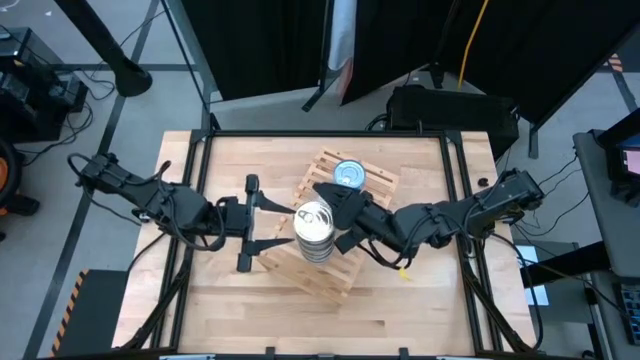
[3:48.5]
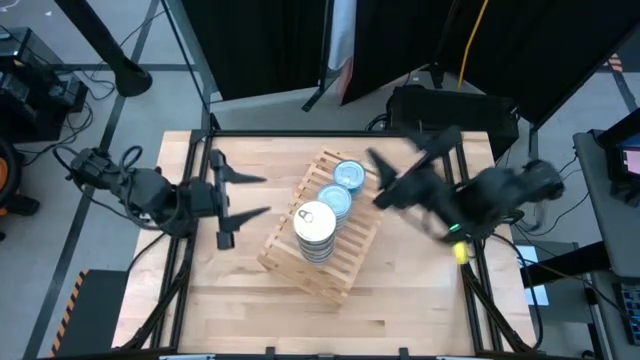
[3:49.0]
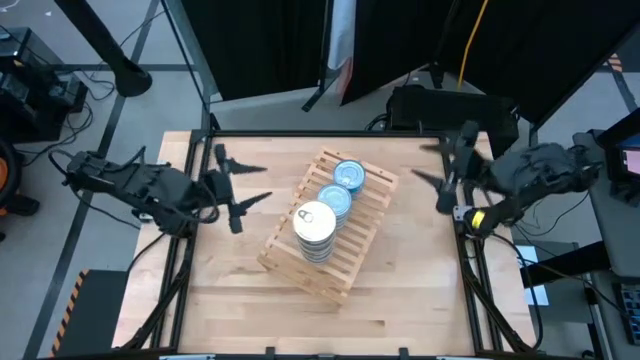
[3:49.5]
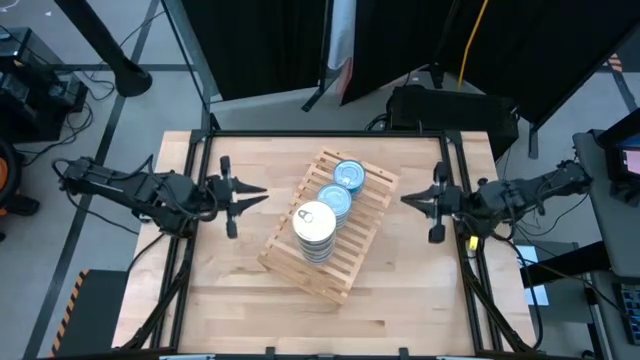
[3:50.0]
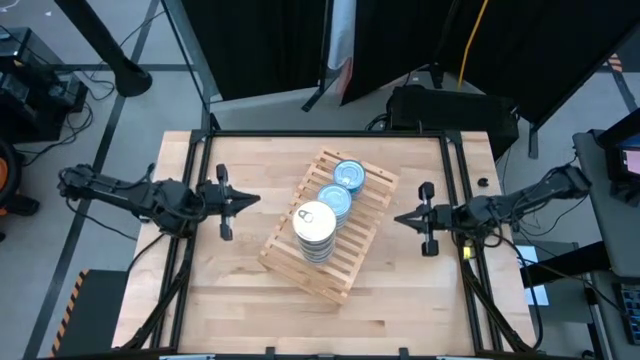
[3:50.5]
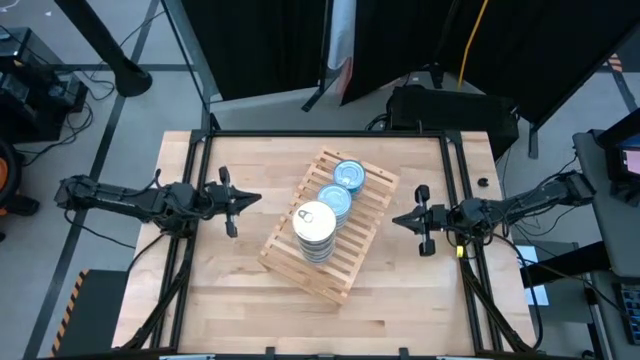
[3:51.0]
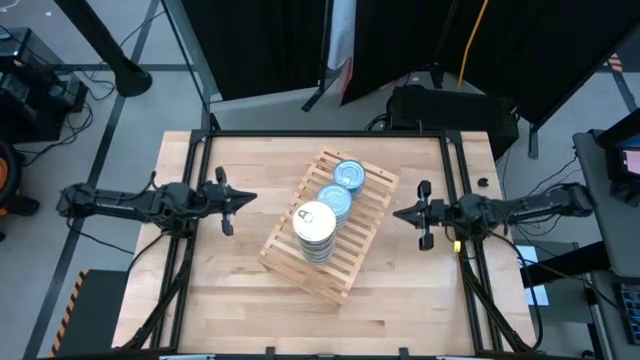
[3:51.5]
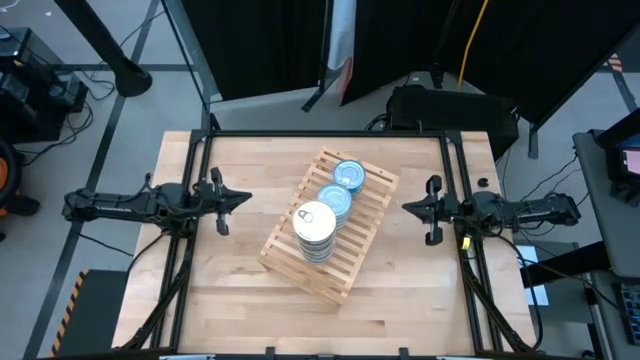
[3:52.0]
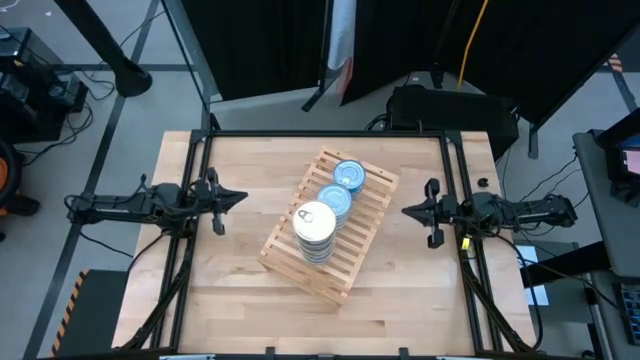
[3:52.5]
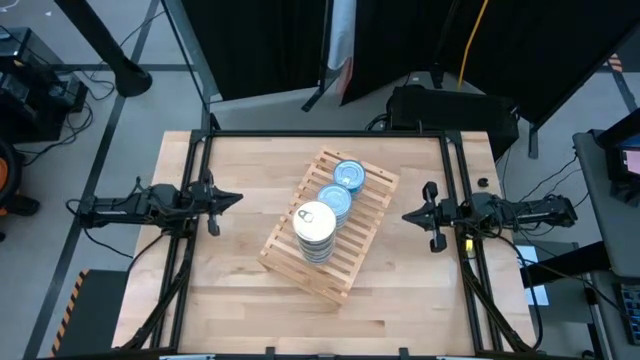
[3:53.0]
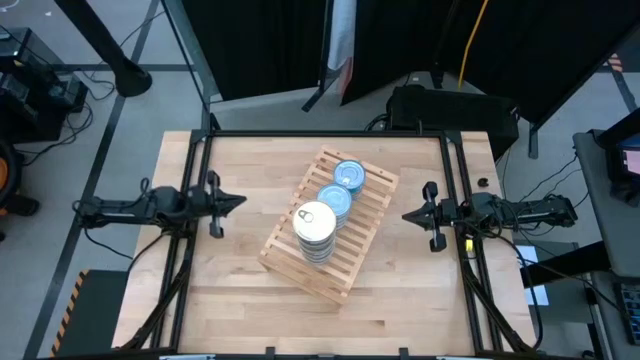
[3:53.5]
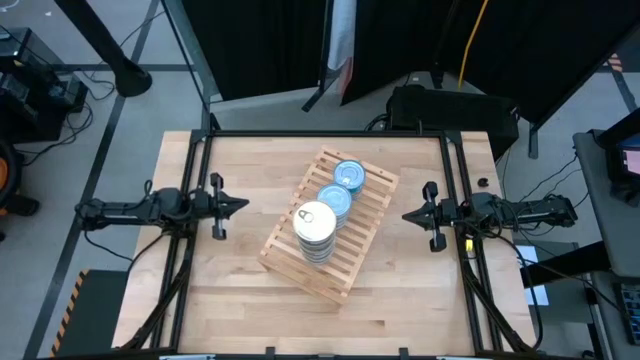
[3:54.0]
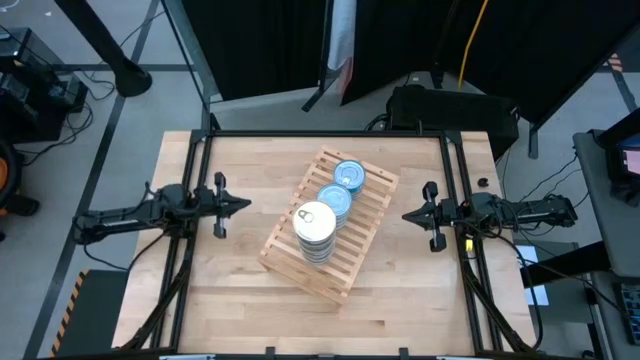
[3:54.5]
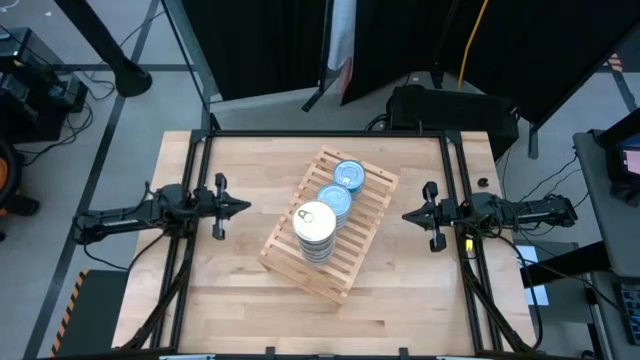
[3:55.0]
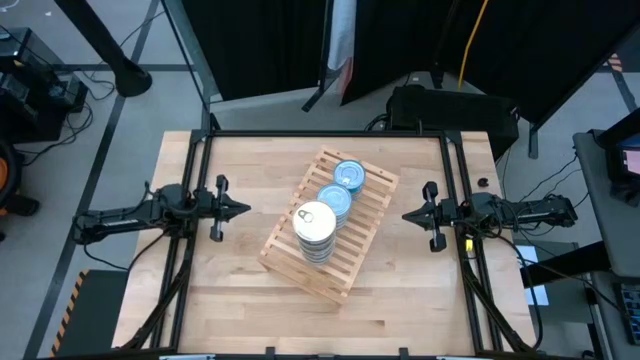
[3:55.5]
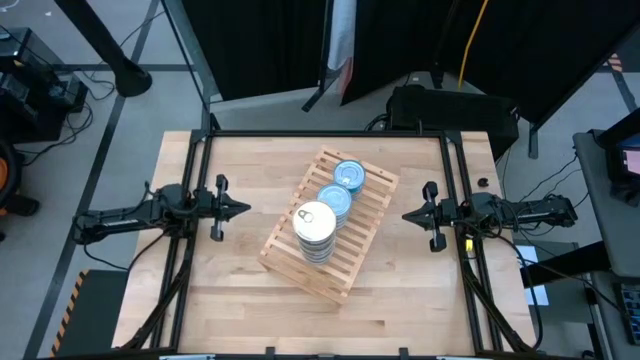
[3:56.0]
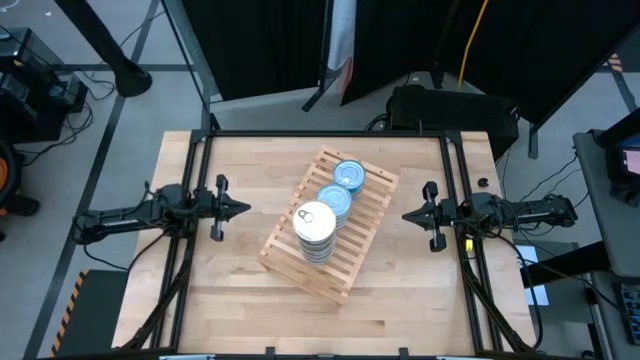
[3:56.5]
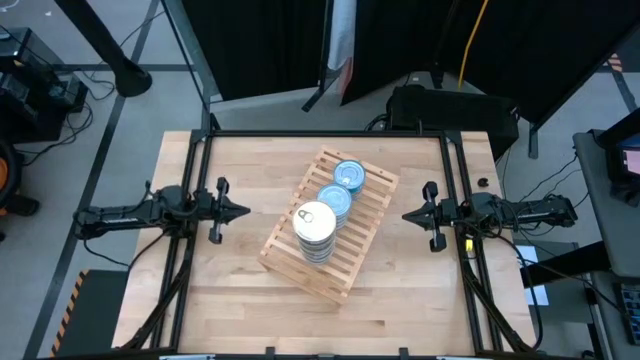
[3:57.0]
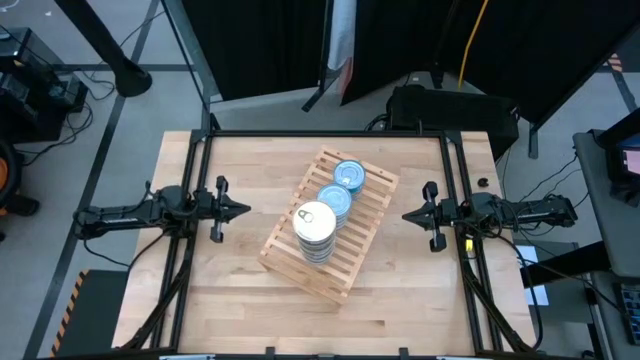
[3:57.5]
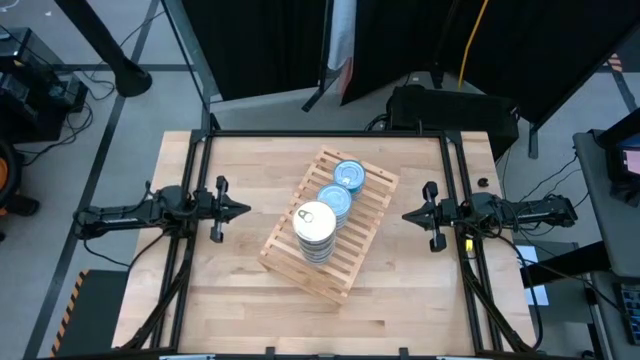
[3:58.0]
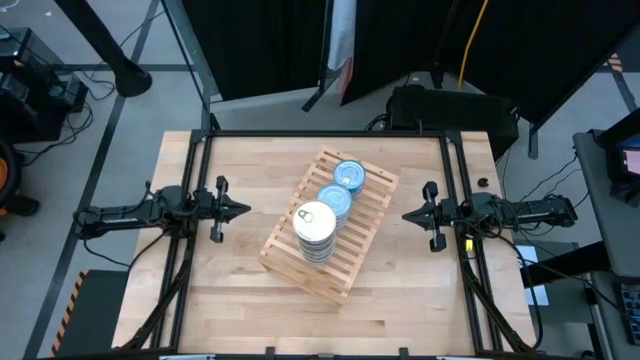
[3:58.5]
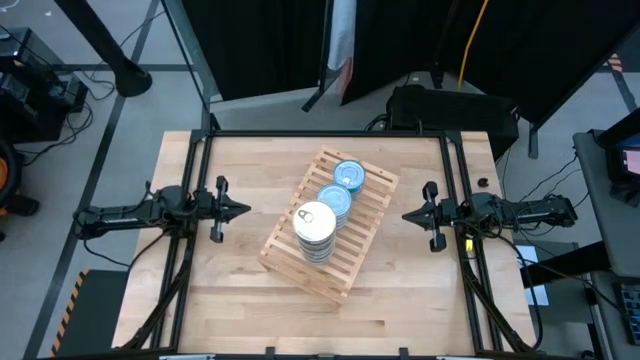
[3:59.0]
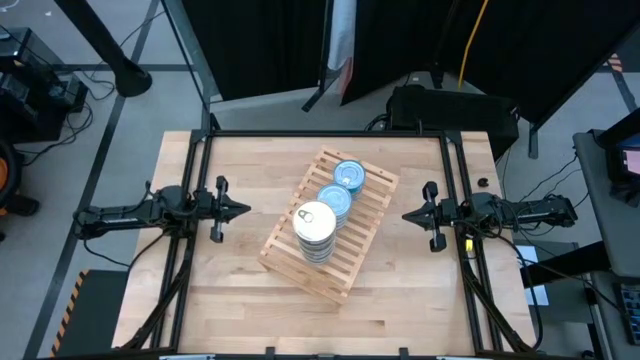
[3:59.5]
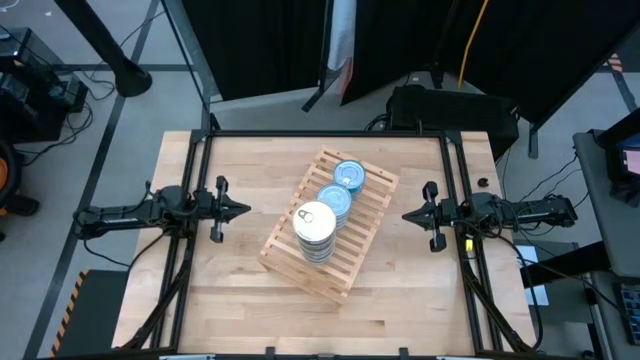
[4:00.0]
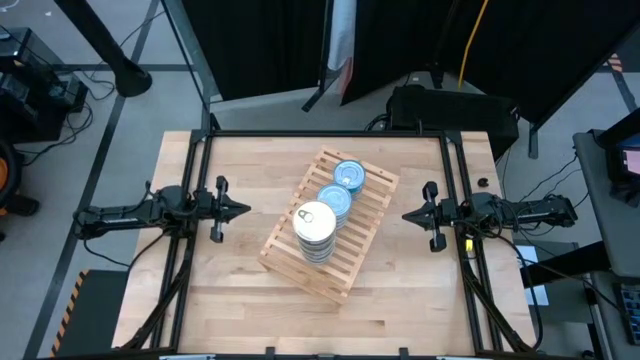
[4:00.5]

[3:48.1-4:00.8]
Task: Stack canned seafood by type on shelf
Return to Home Position

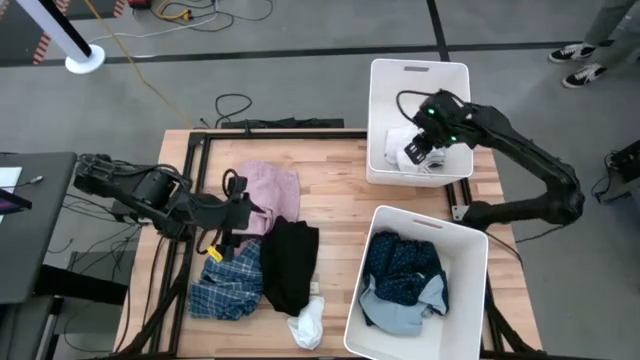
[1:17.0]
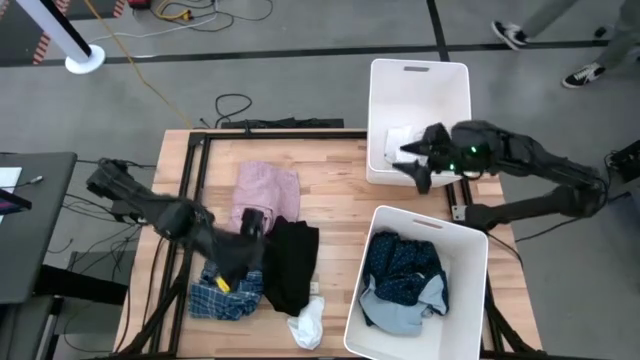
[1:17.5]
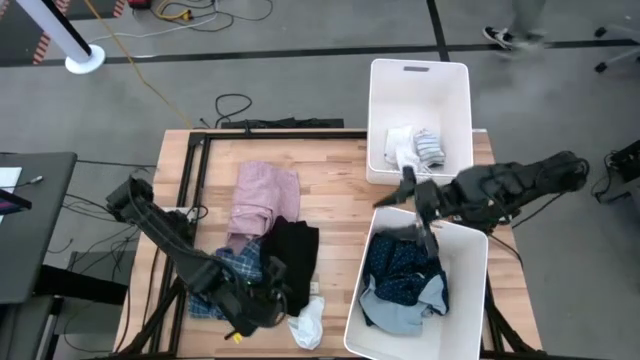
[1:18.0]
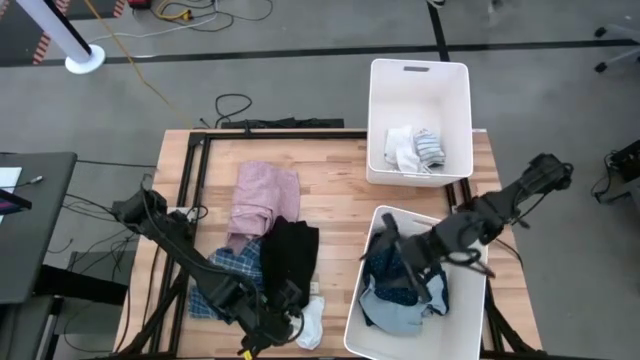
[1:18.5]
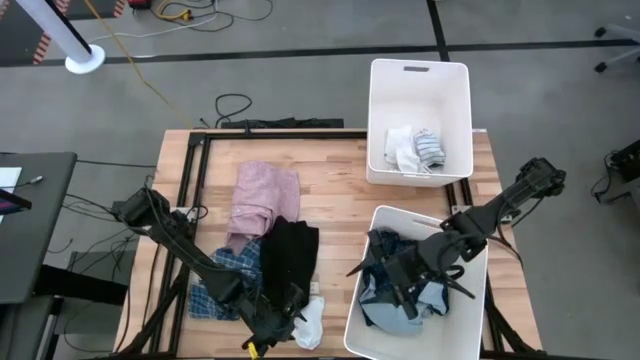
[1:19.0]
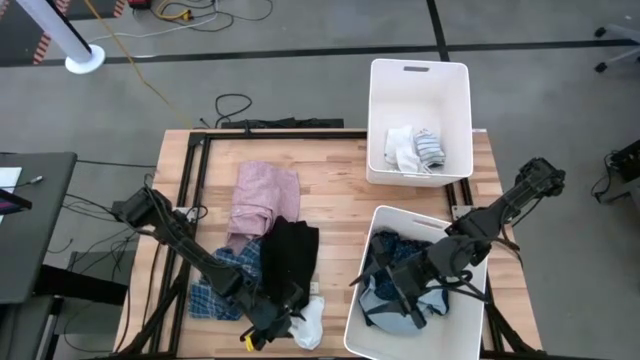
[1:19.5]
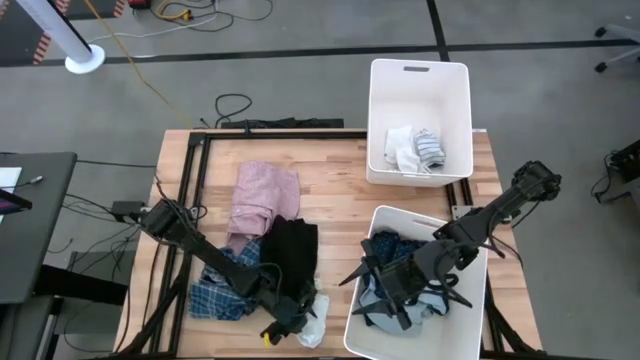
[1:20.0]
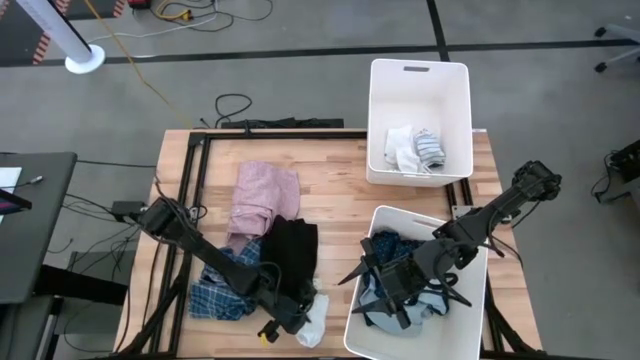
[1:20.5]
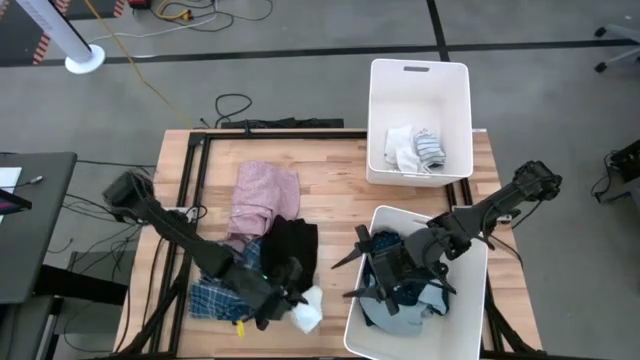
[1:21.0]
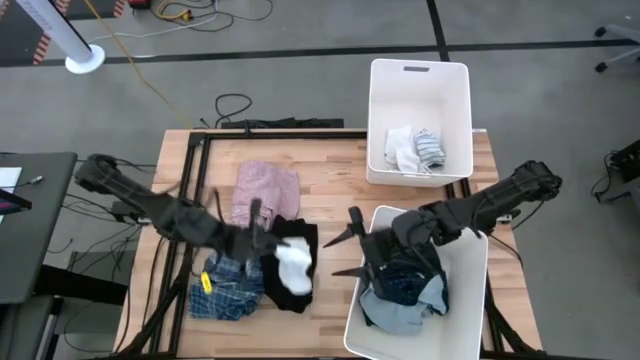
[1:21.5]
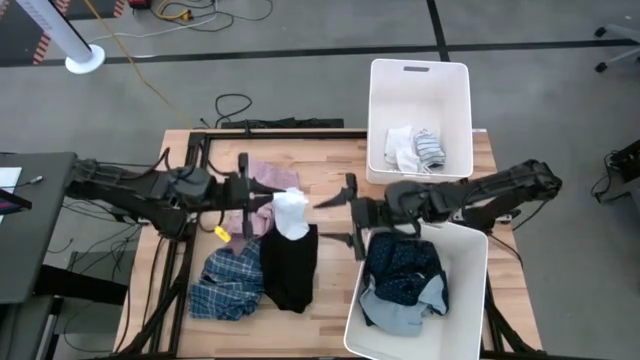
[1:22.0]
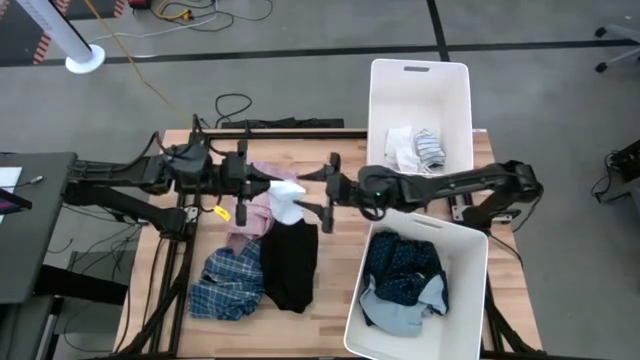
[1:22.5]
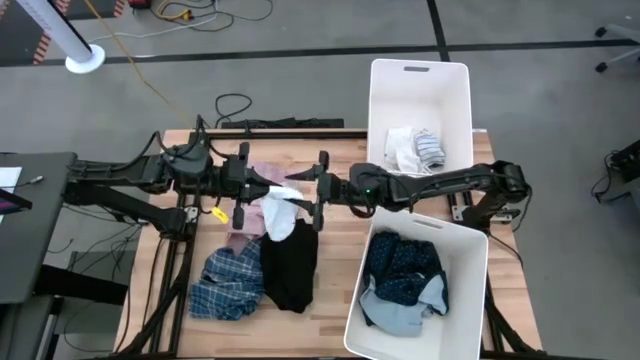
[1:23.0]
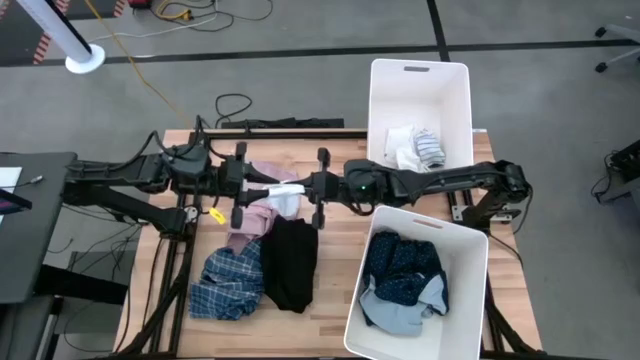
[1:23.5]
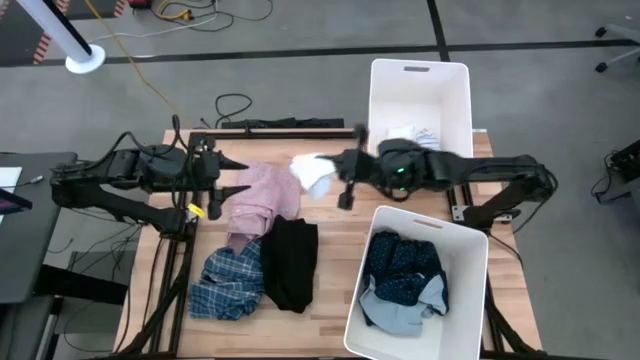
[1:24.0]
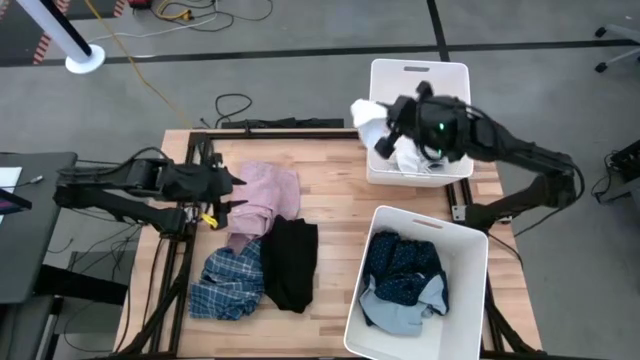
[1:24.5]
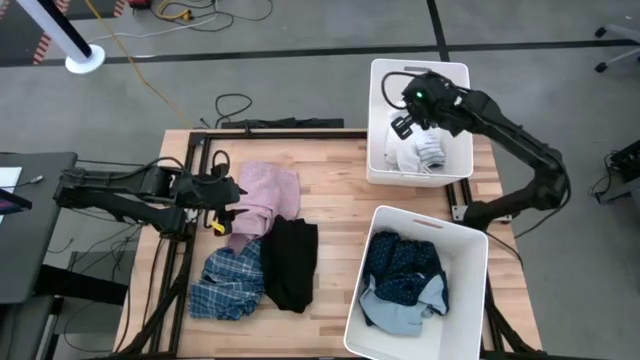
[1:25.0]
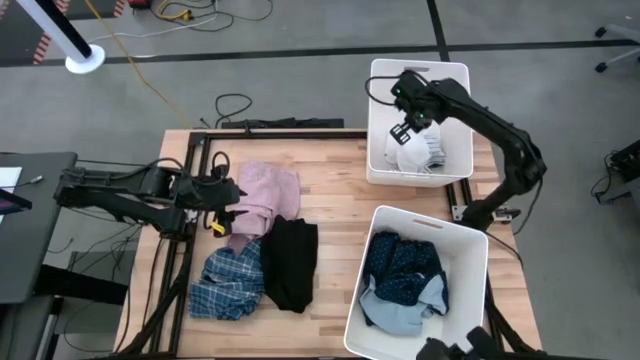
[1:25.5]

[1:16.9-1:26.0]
Task: Sort clothes
Put the white sock in the top laundry bin

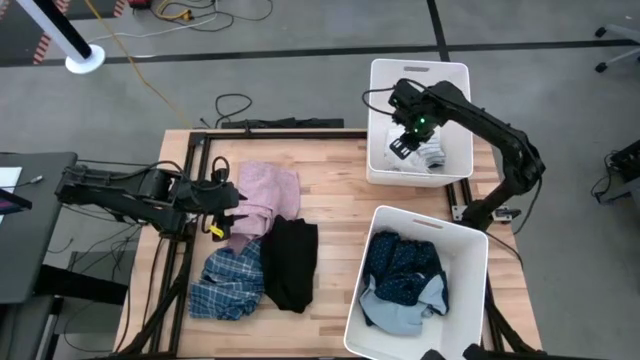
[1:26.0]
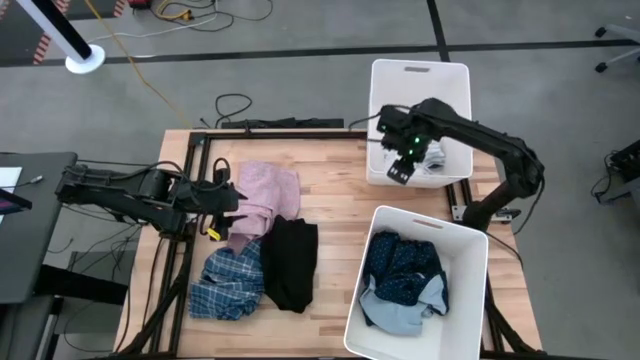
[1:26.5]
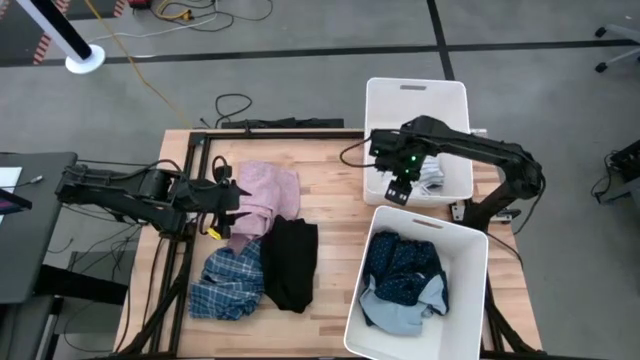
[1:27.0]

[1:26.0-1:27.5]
Adjust the top laundry bin
